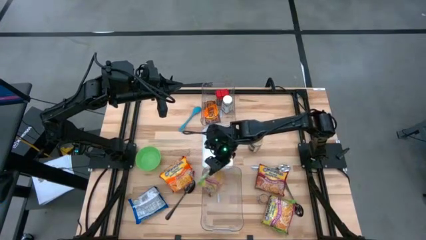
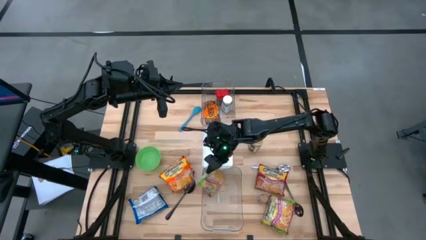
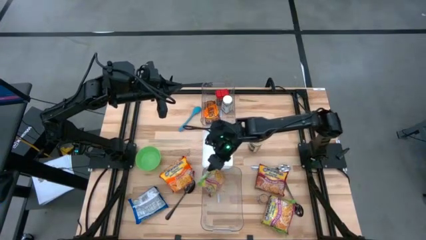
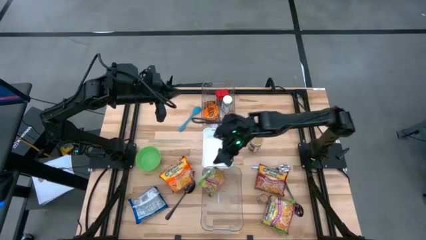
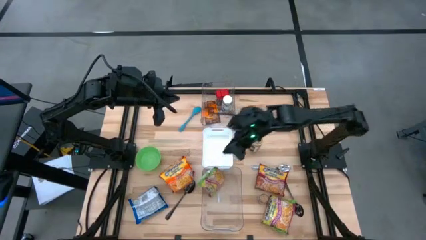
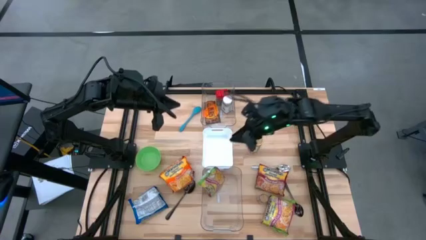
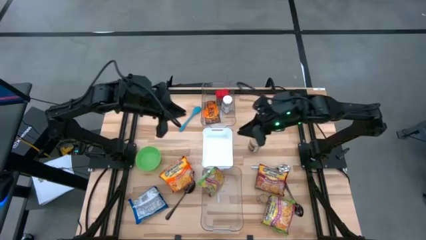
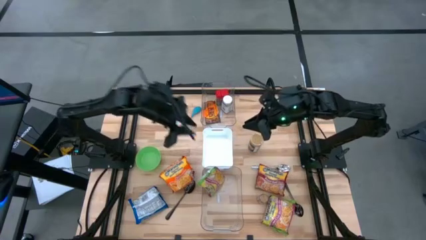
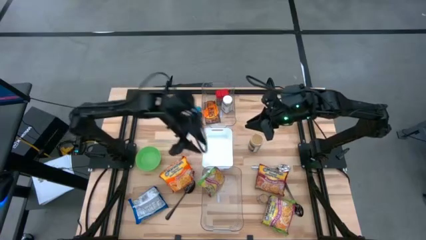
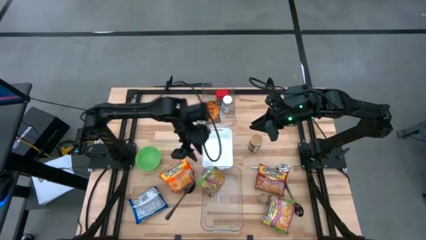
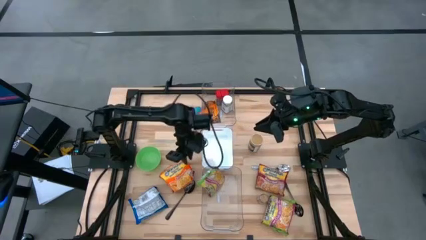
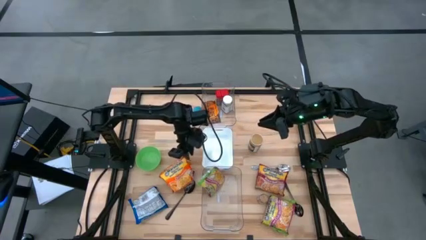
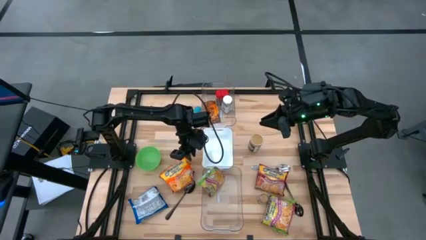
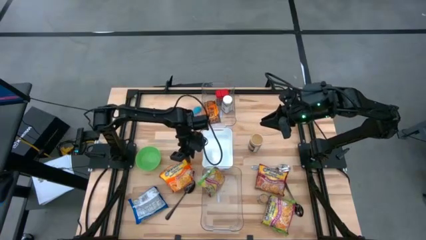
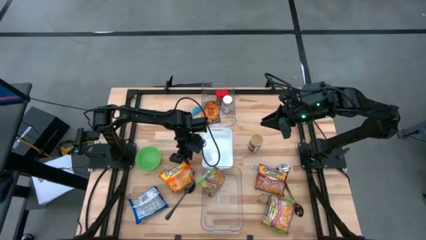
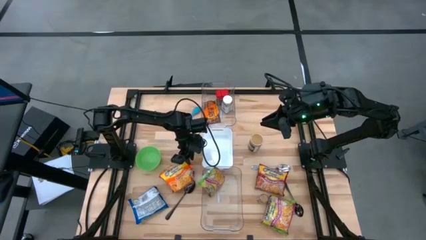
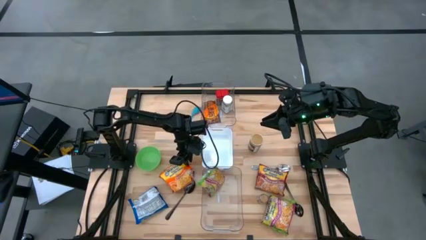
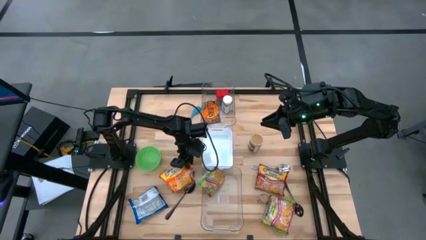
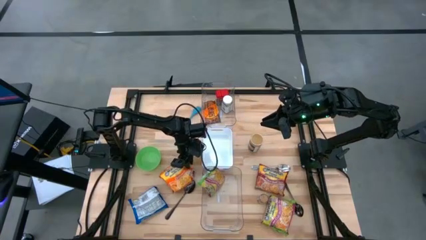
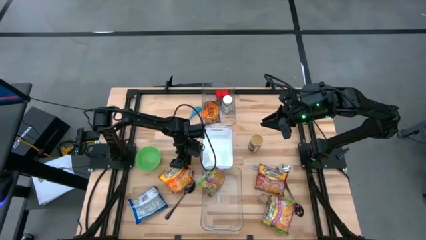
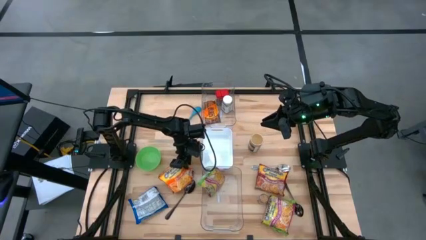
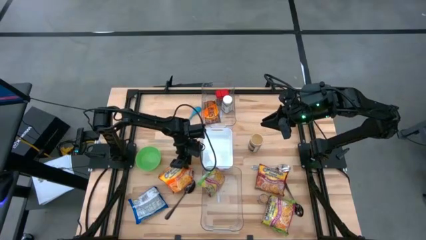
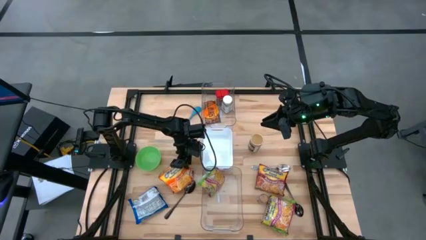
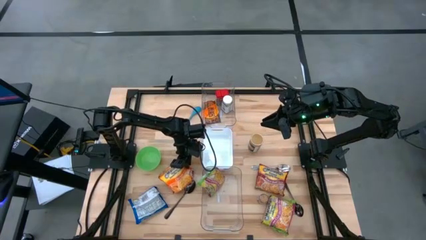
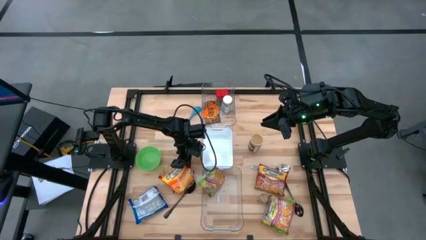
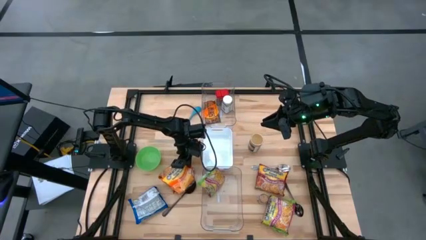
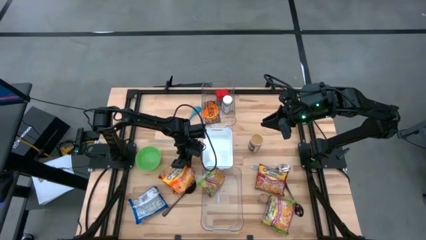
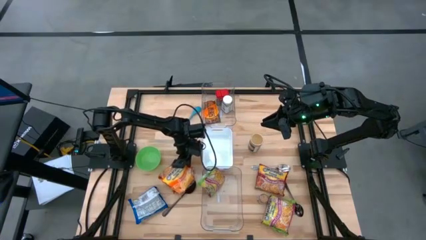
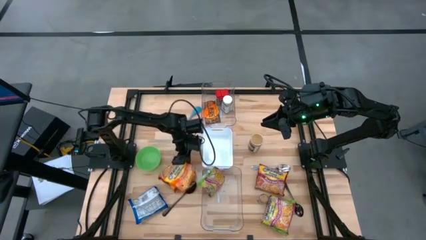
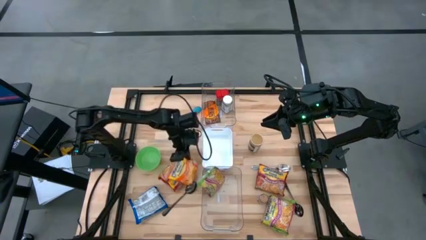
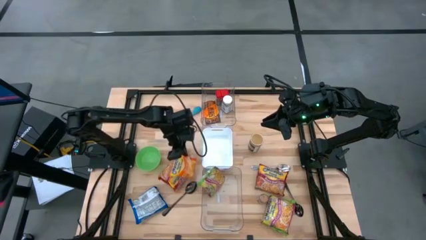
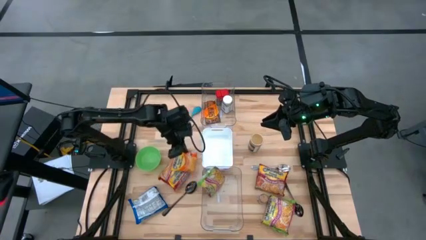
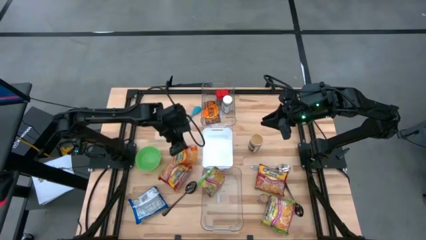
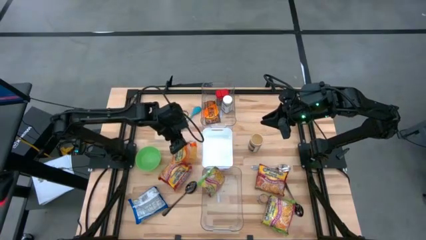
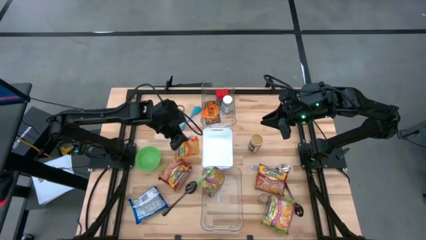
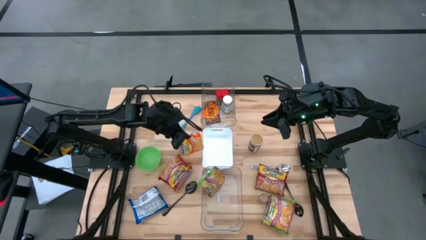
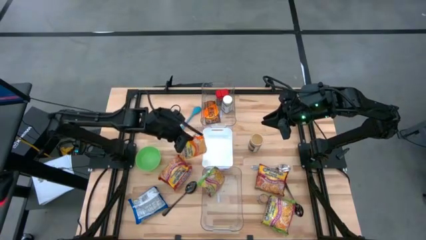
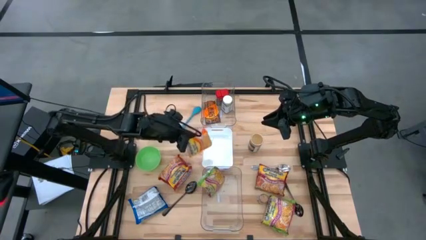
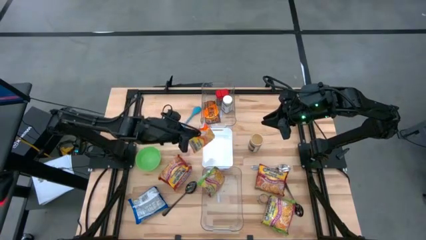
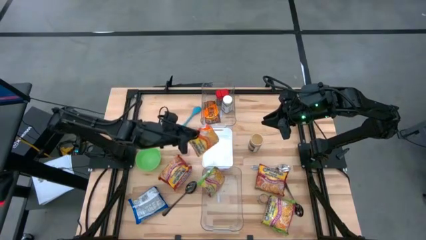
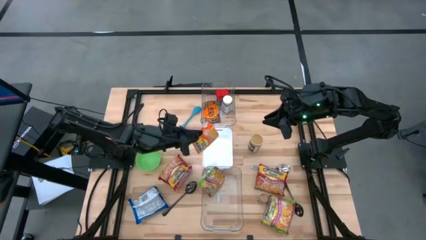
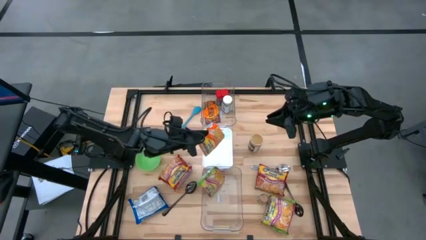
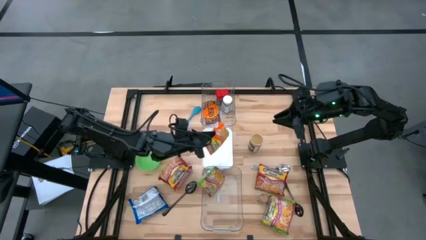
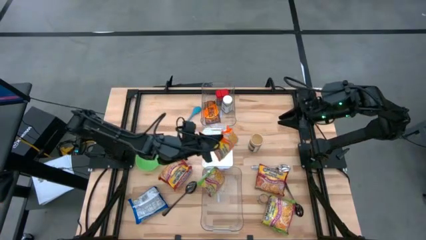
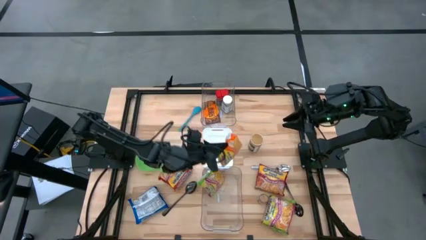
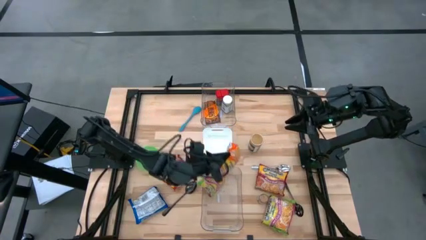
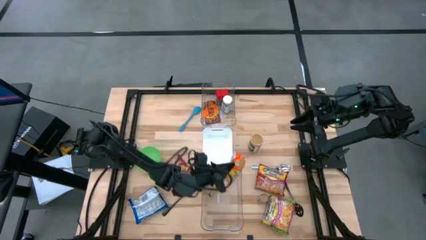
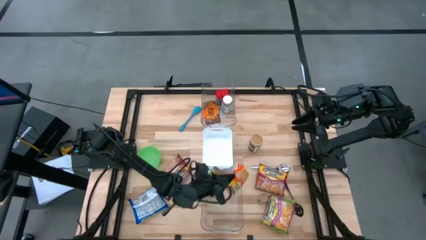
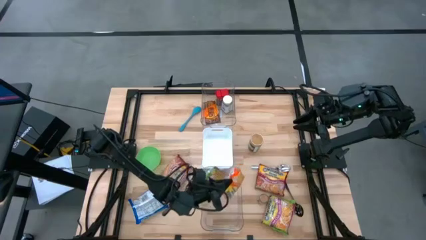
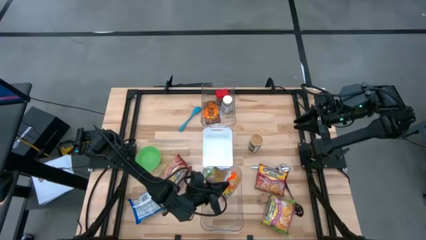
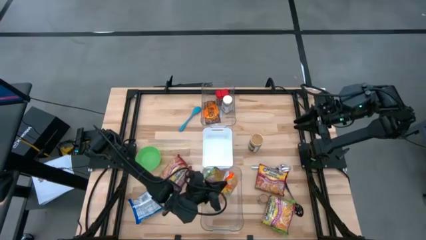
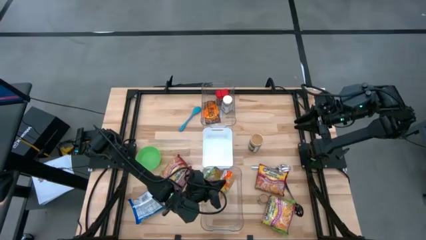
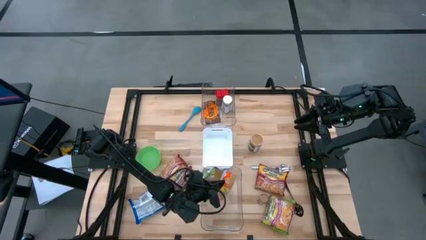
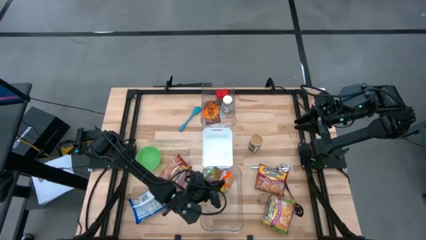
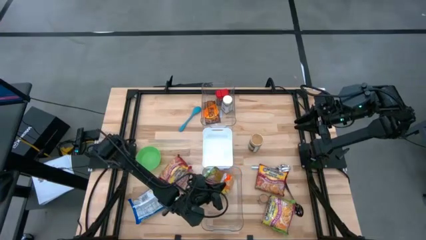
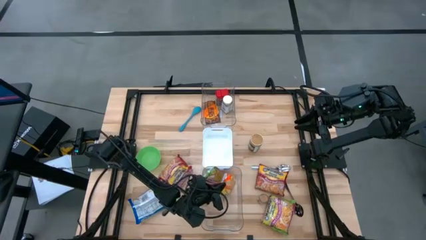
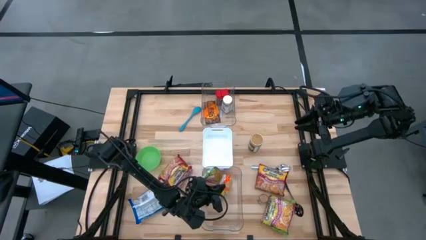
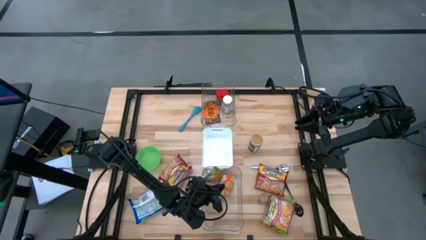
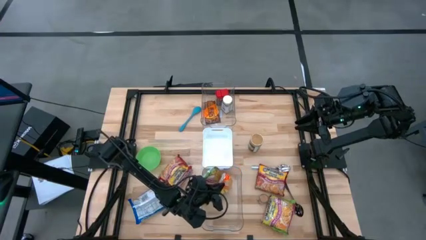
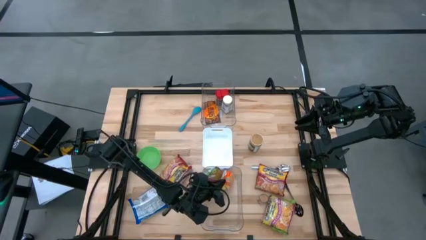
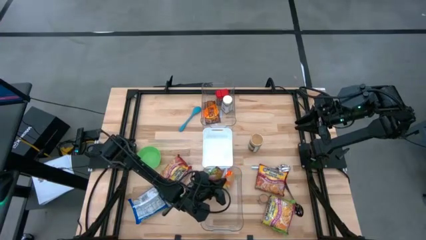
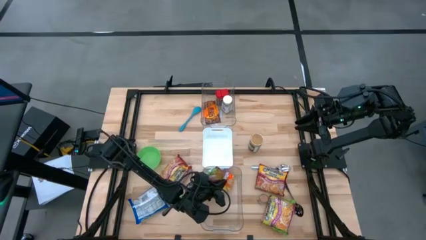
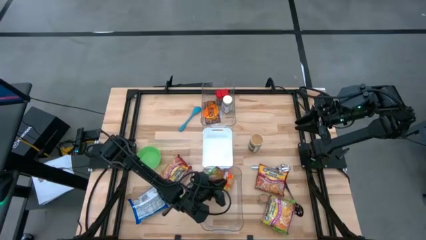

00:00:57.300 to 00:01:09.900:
Task: Pick & Place Food Item
Put the orange noodle pack into the bottom transparent bin

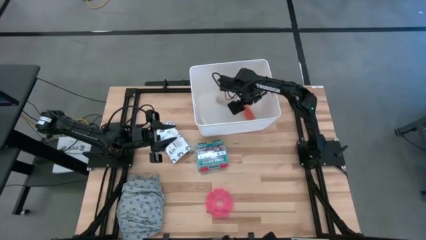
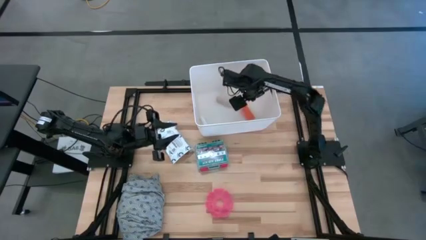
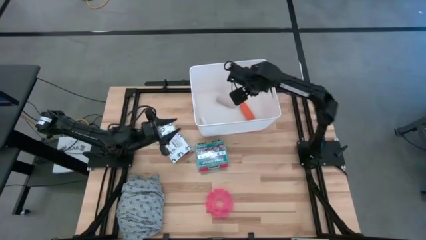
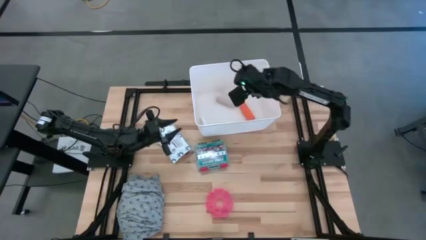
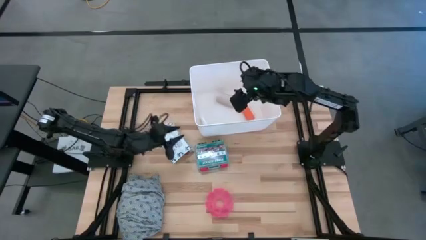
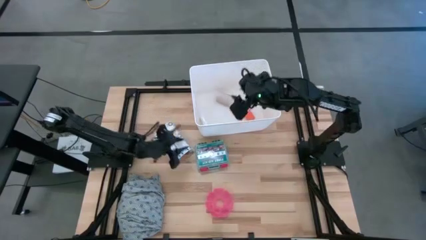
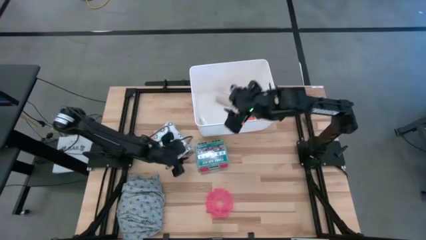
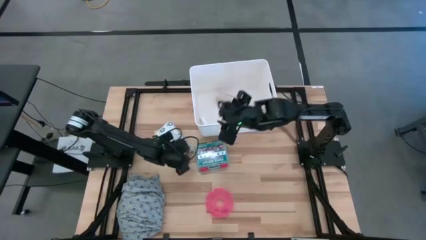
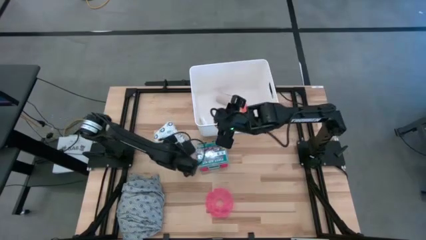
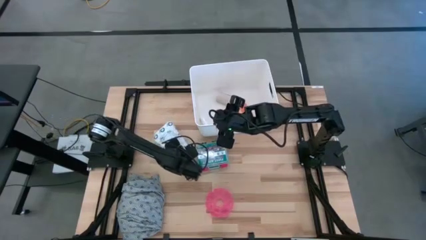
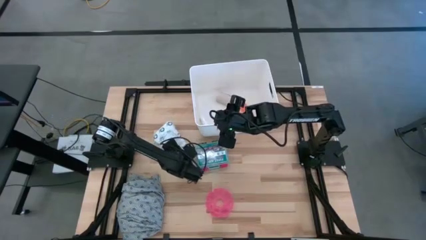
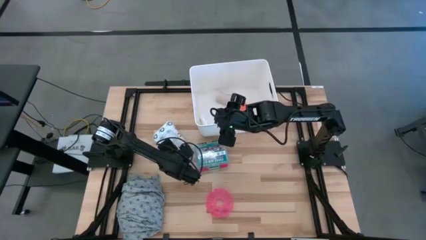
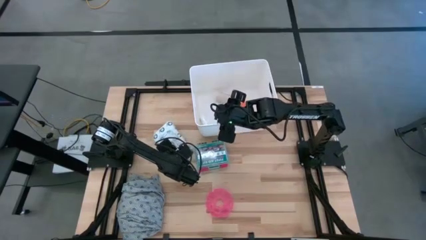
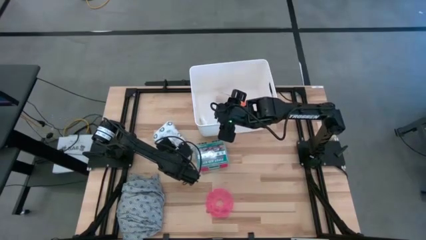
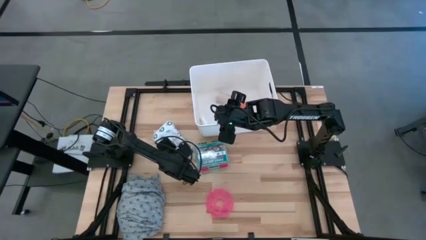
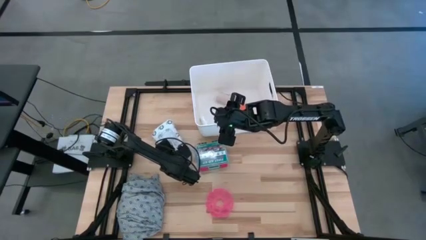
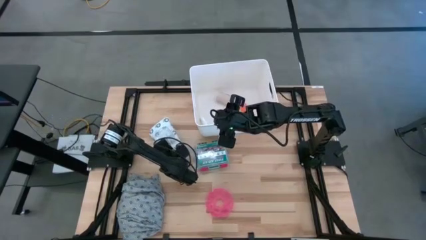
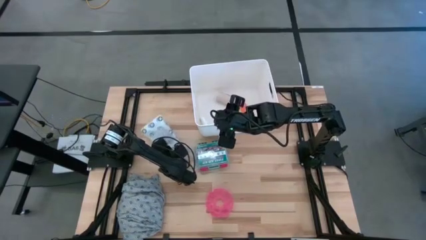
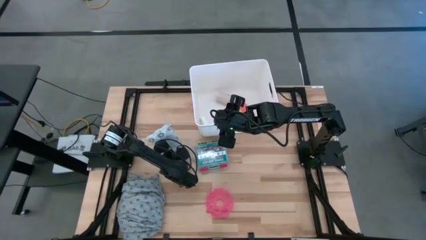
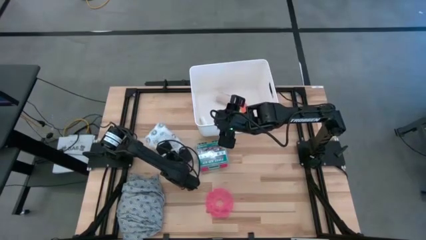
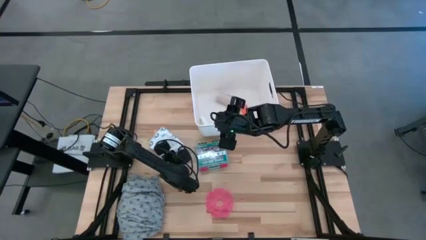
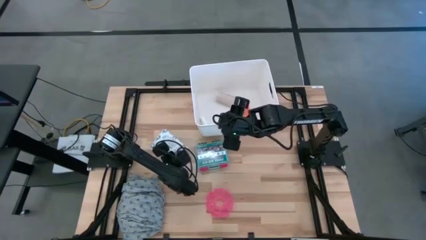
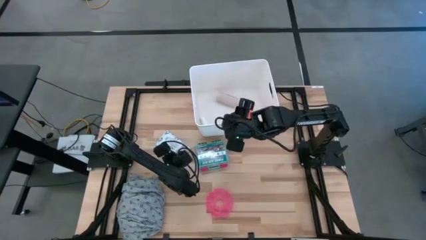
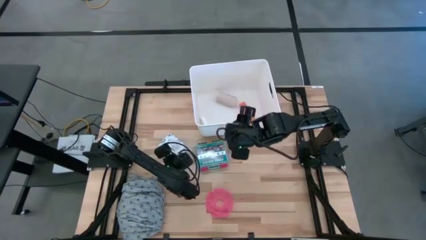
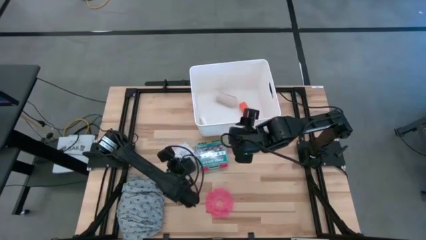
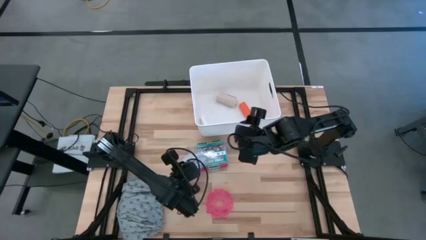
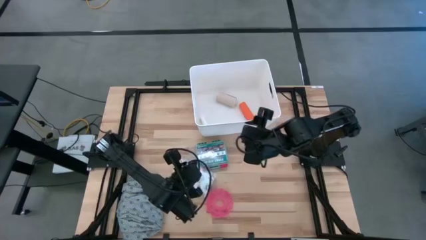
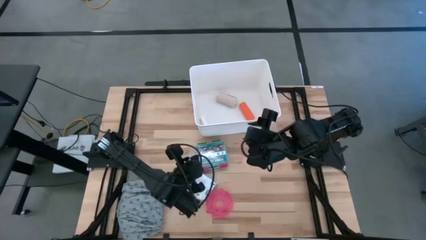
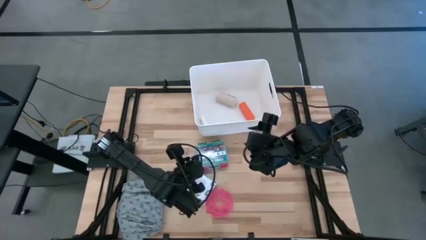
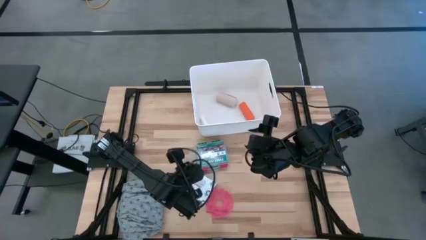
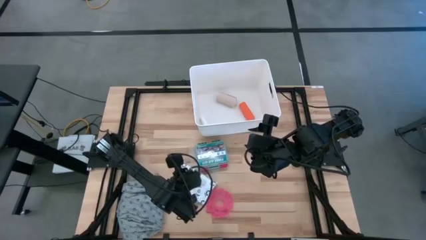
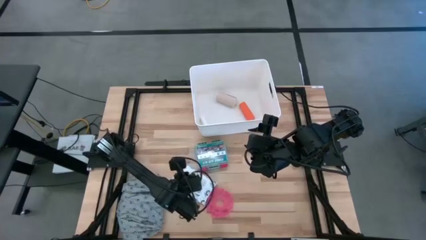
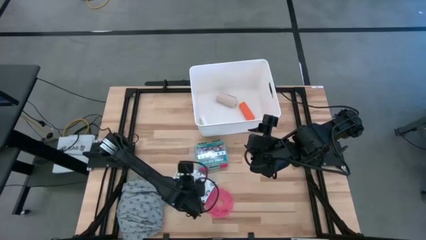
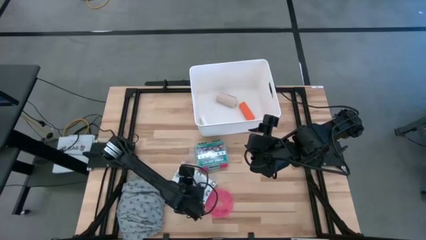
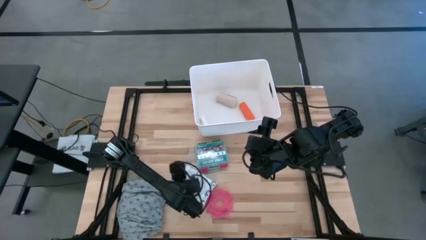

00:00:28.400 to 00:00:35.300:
Task: Pick & place medical supplies in basket/bin
Put the mailer bag into the white bin
